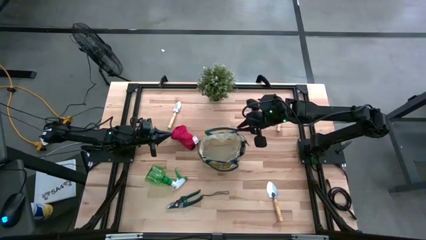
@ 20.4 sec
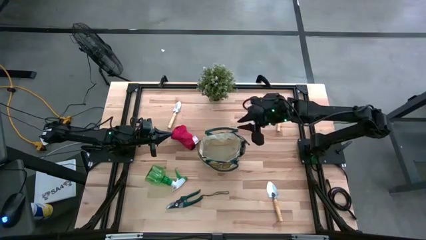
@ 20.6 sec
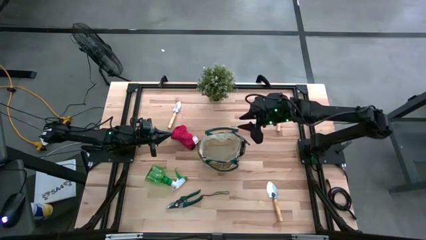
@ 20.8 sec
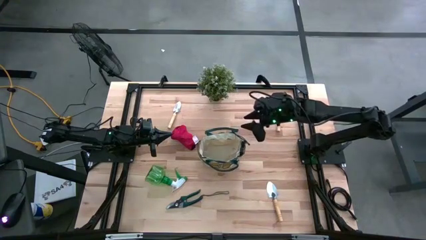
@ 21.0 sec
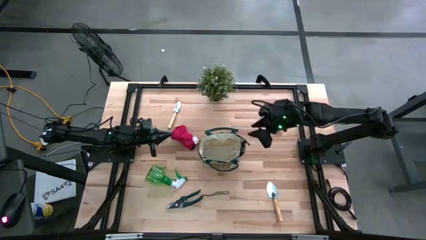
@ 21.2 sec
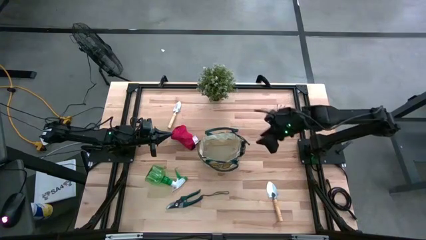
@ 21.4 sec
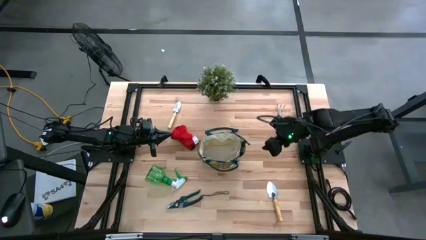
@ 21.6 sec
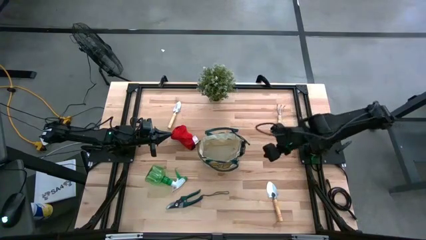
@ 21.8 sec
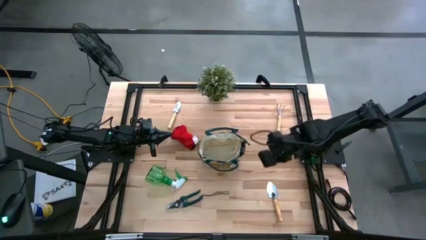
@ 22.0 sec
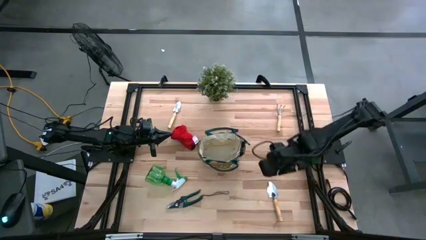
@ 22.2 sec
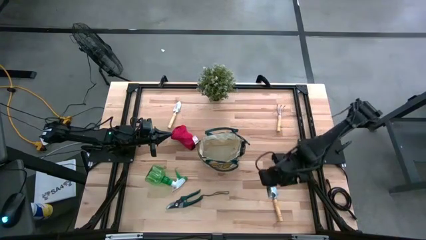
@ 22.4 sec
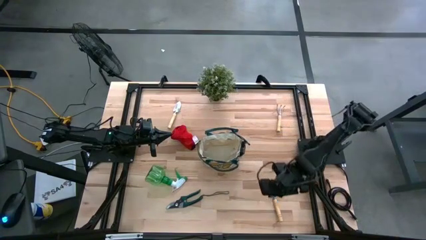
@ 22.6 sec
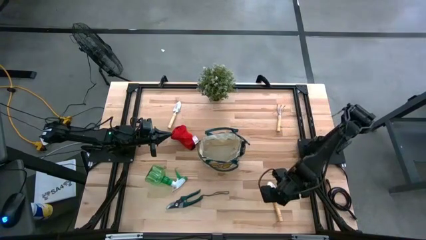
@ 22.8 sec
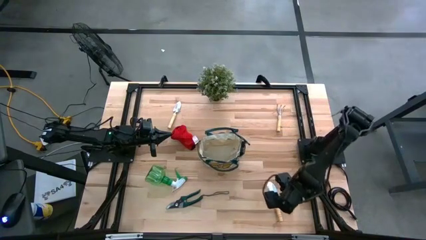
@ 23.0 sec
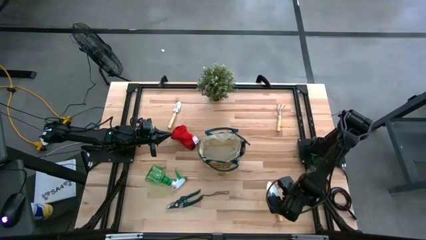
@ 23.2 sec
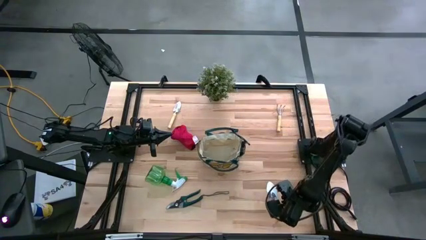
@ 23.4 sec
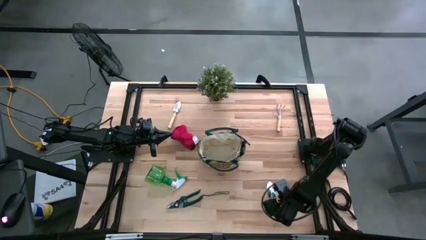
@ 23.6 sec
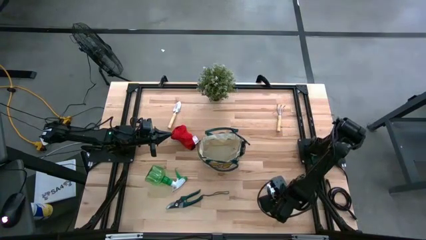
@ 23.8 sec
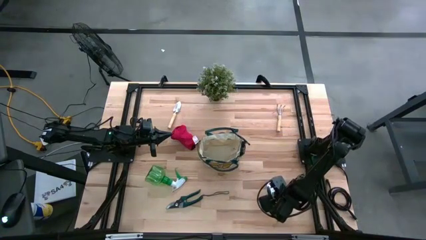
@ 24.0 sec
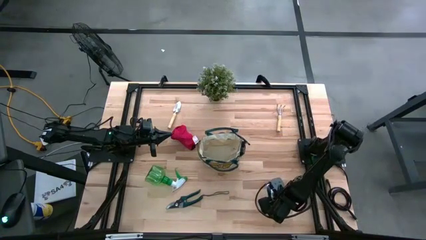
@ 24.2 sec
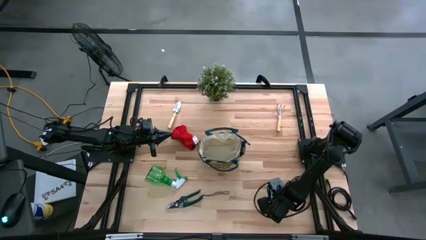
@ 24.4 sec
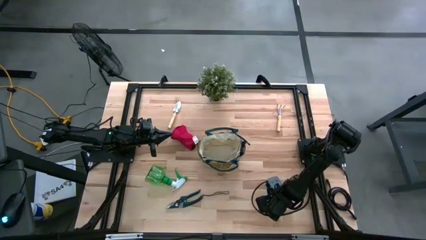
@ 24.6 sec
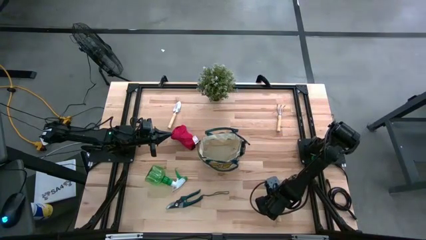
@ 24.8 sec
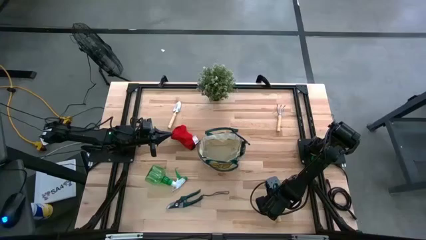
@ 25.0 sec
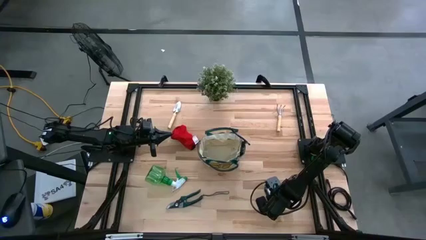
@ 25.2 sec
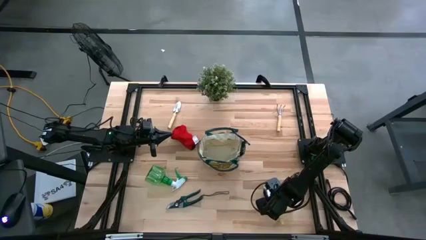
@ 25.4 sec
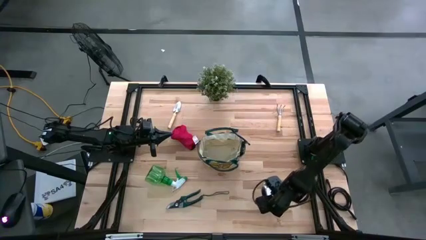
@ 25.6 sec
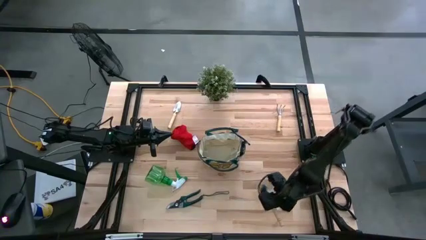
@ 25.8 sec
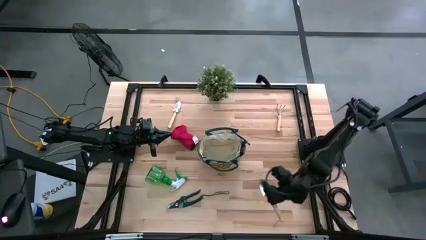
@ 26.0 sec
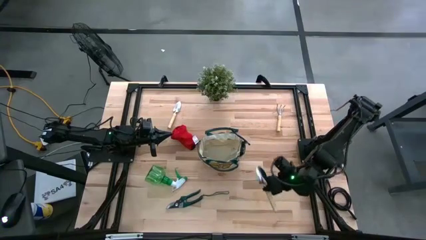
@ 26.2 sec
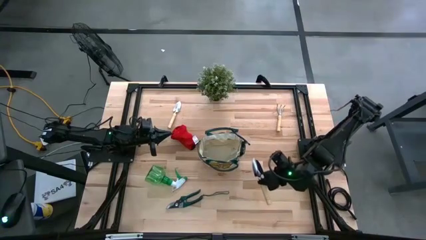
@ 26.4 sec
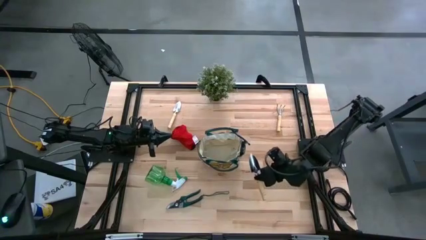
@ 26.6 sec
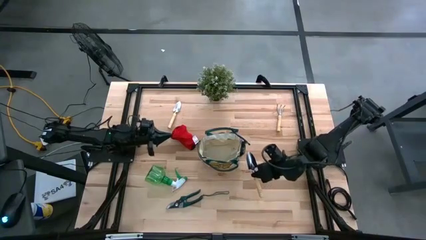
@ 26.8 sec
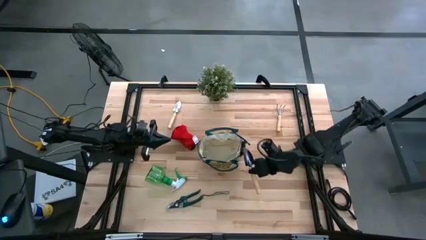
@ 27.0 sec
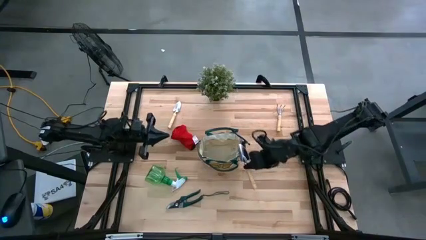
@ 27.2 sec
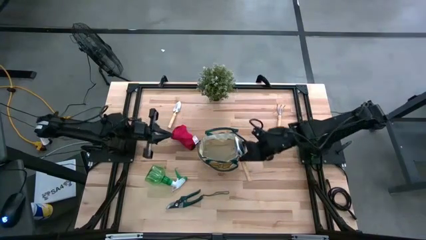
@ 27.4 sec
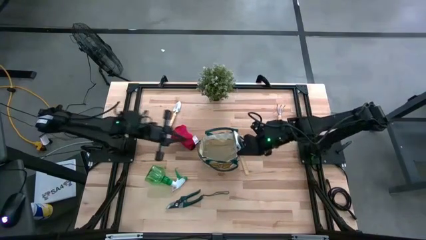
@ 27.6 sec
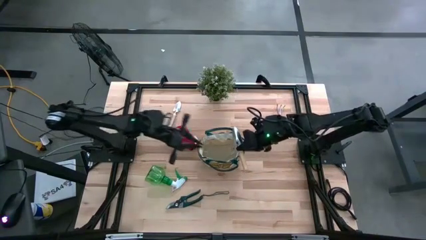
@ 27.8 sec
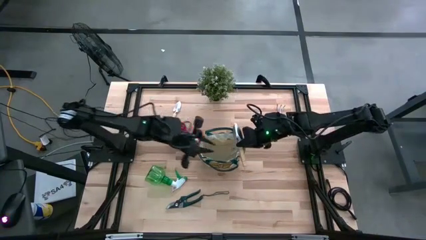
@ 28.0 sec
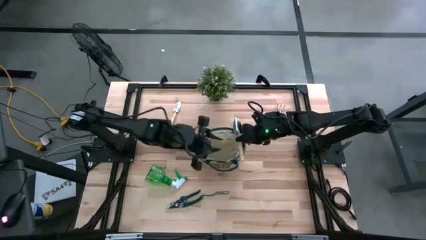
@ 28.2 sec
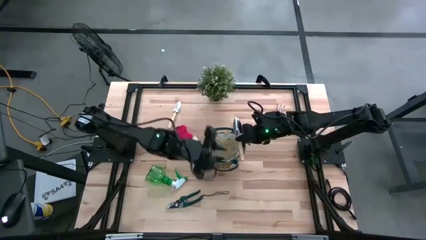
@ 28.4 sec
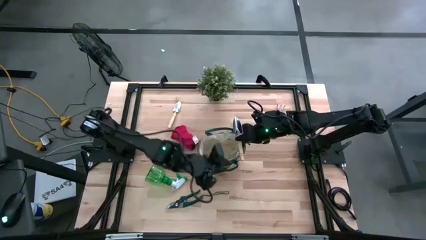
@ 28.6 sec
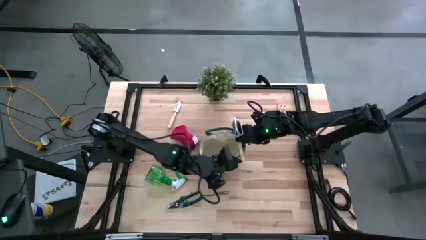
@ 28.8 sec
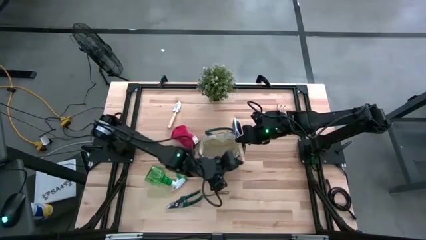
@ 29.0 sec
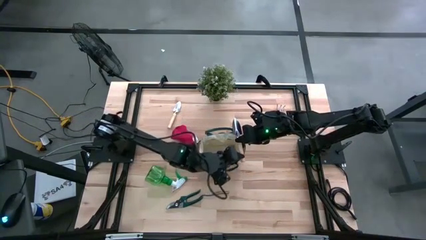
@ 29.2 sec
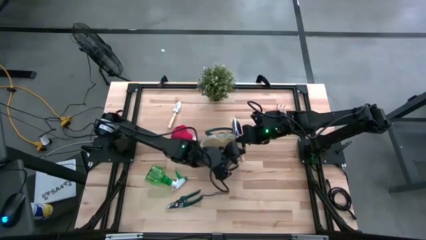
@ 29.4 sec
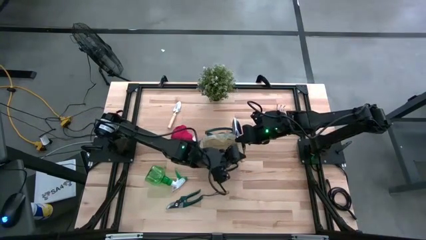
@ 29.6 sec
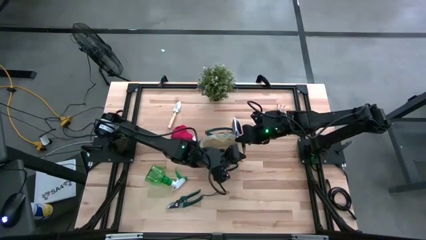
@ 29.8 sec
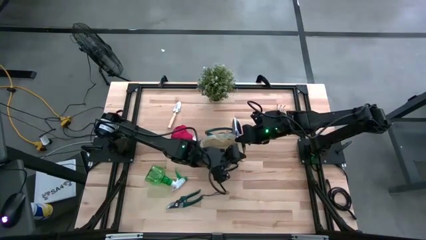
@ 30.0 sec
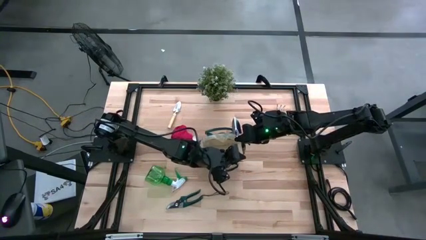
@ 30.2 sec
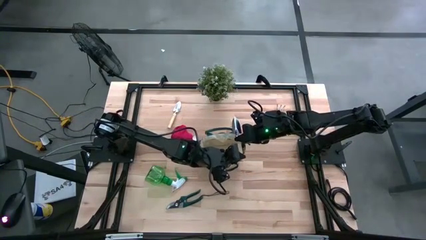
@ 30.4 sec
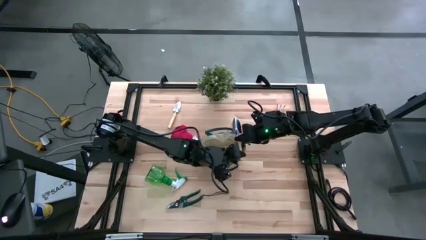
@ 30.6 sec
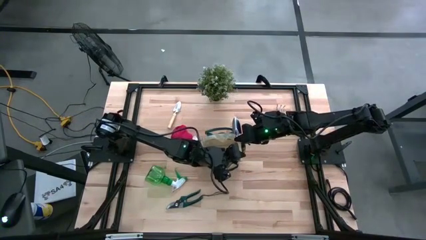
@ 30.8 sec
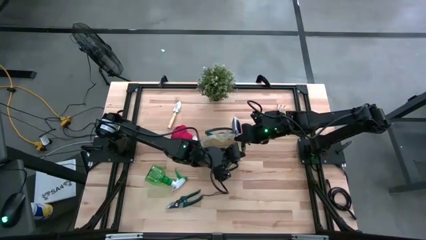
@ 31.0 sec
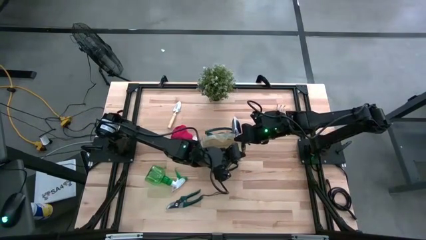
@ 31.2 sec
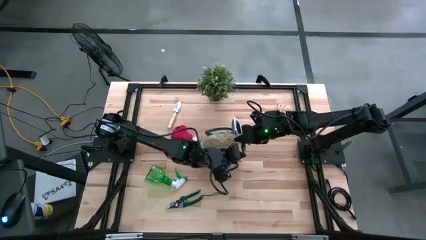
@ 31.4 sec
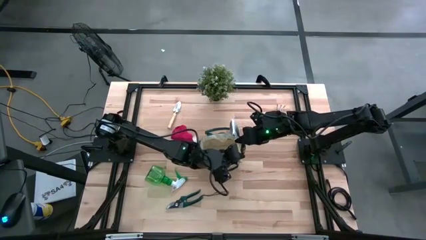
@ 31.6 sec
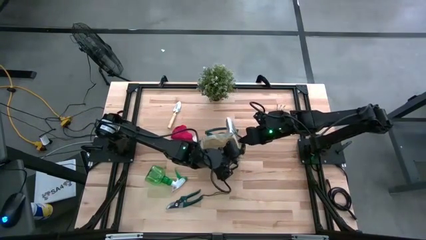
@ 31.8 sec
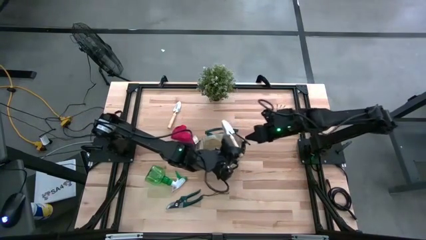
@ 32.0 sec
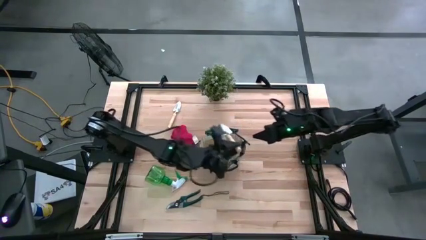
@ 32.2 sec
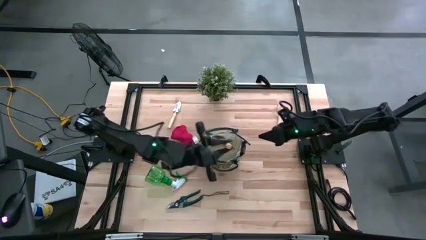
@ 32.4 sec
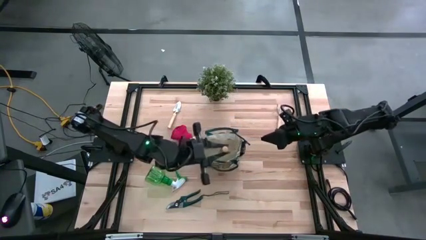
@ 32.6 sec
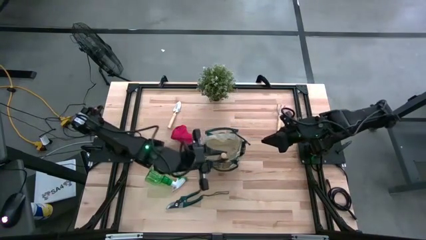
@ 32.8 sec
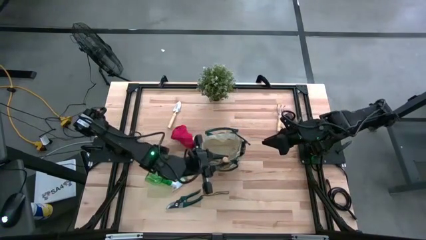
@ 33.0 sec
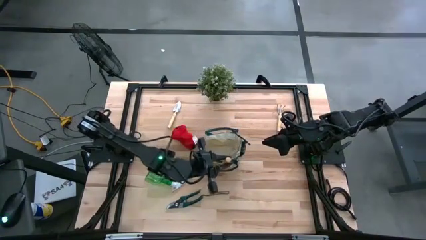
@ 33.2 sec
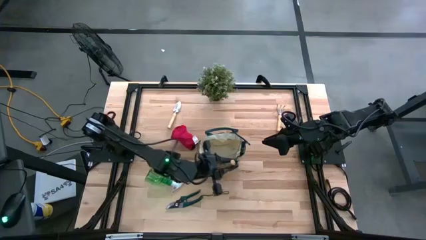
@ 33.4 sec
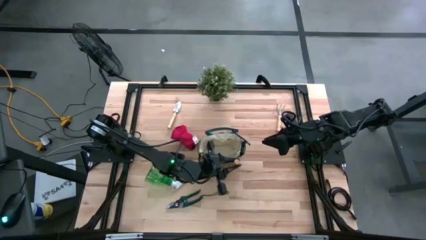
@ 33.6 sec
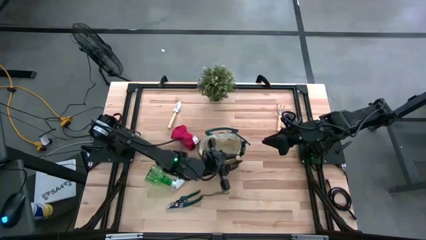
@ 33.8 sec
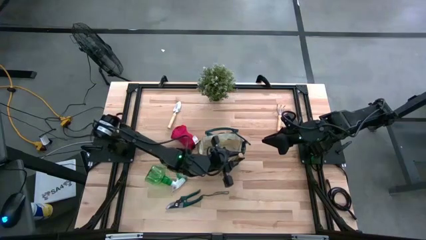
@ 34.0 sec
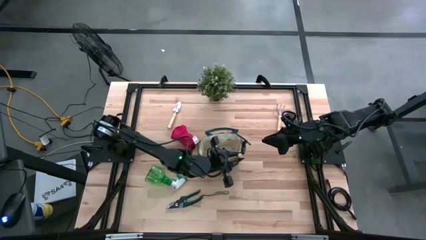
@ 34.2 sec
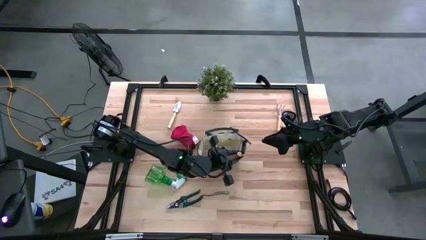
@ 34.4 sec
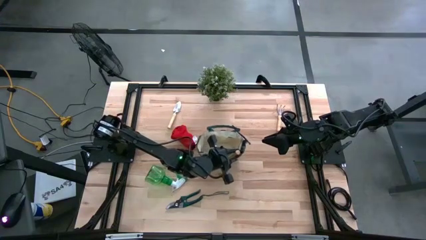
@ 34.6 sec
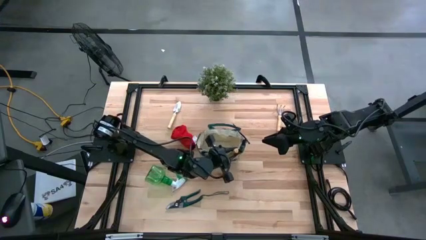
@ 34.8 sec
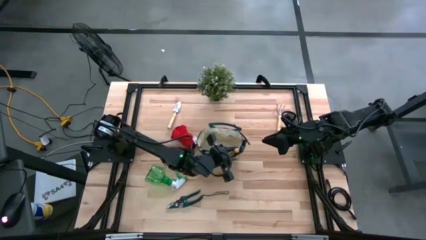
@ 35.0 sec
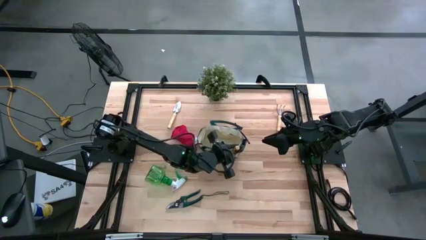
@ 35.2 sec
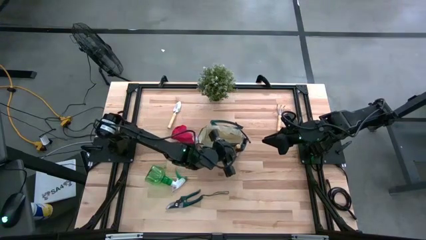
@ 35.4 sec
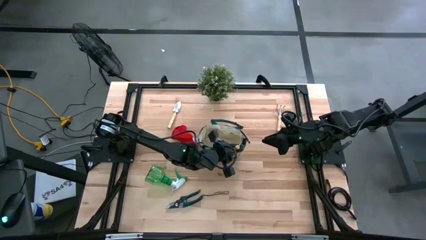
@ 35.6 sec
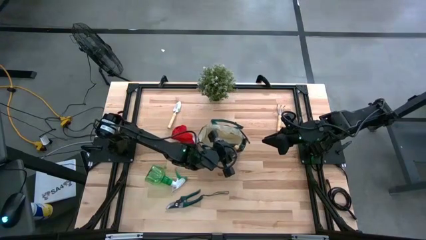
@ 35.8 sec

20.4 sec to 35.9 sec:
Task: Pick & Place Garden tools in Gardening bag
Put the bottom trowel into the gardening bag
